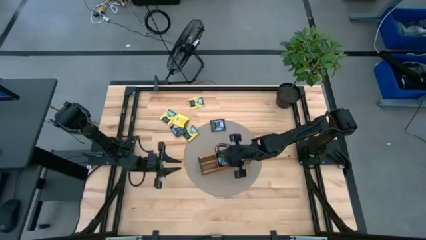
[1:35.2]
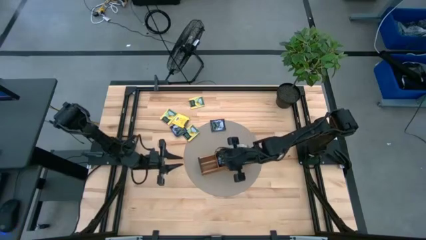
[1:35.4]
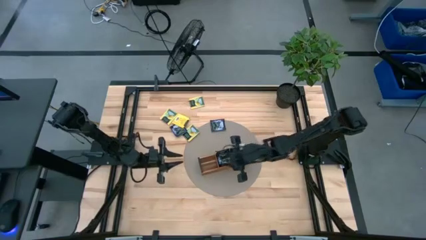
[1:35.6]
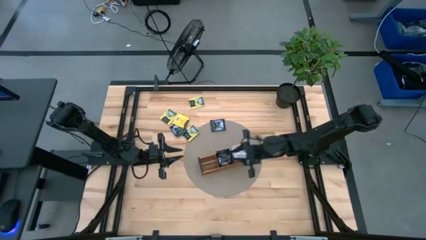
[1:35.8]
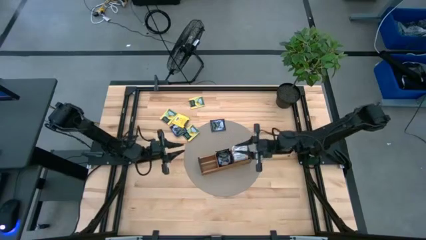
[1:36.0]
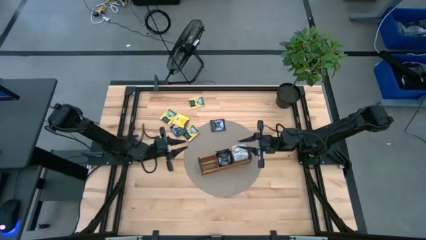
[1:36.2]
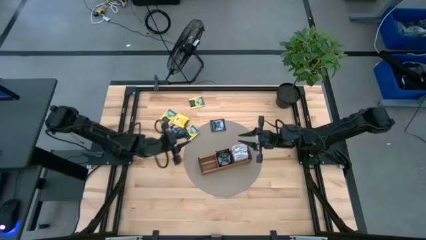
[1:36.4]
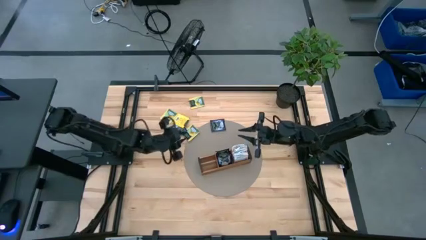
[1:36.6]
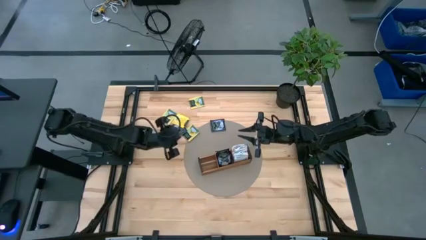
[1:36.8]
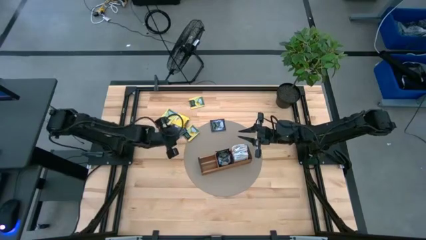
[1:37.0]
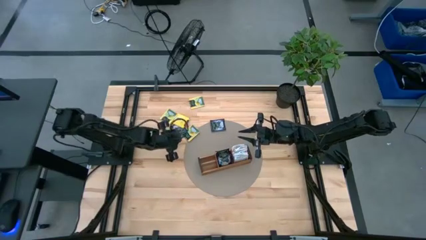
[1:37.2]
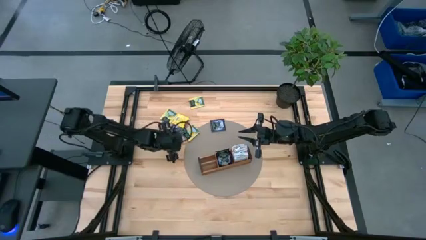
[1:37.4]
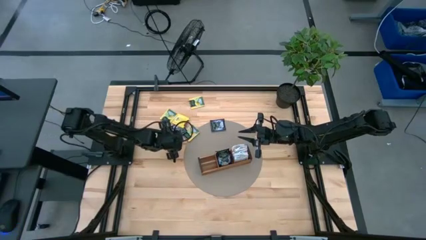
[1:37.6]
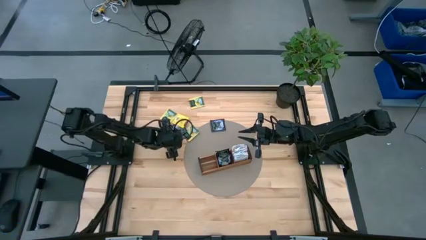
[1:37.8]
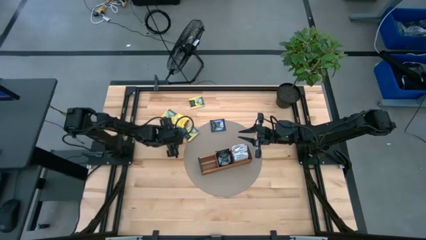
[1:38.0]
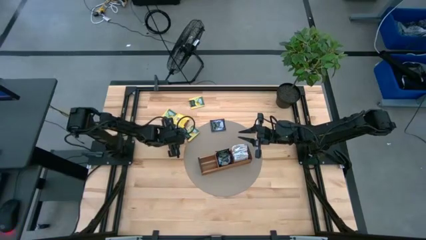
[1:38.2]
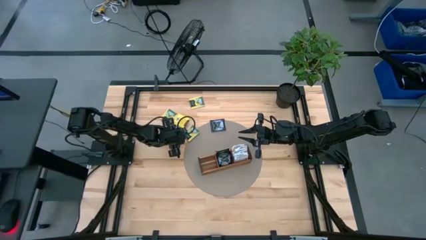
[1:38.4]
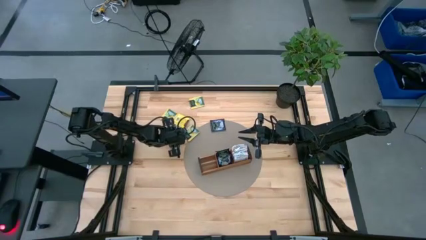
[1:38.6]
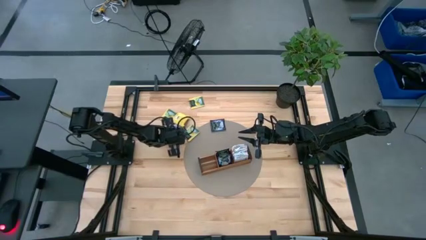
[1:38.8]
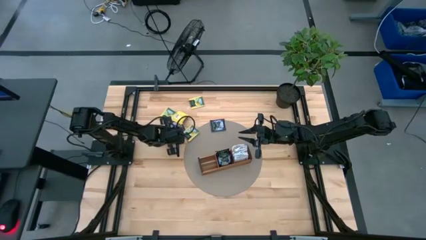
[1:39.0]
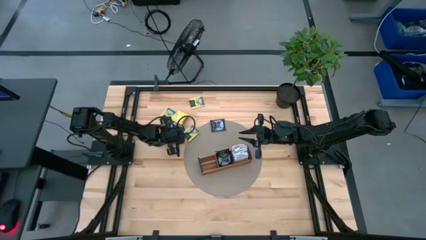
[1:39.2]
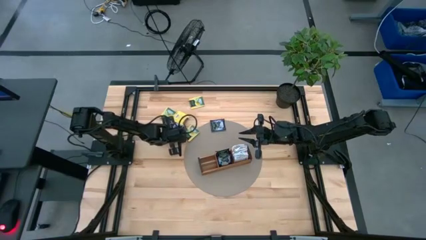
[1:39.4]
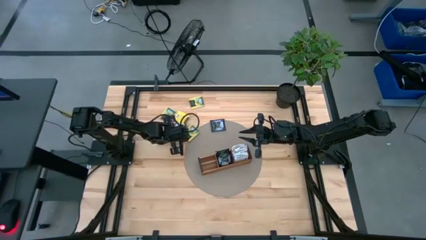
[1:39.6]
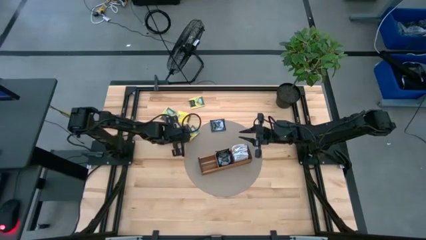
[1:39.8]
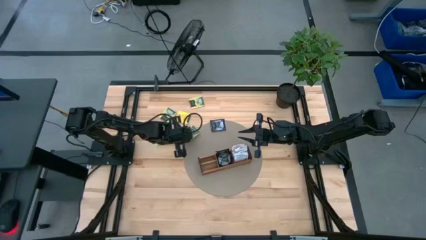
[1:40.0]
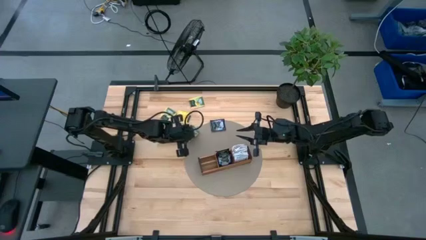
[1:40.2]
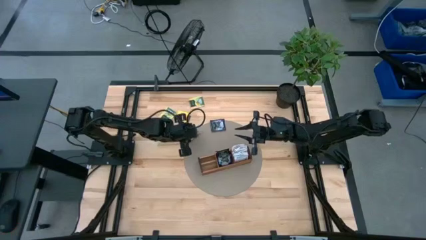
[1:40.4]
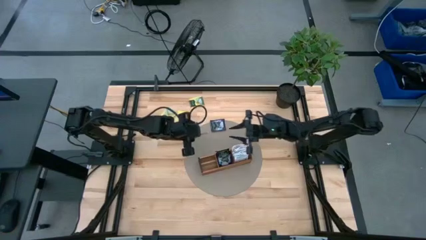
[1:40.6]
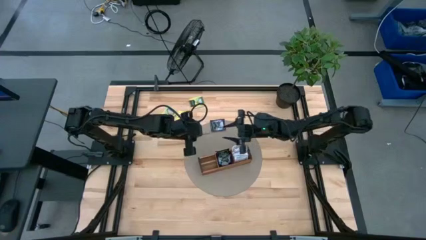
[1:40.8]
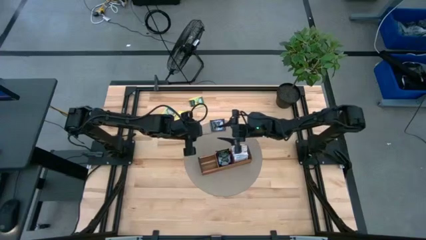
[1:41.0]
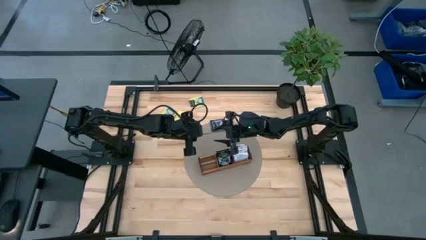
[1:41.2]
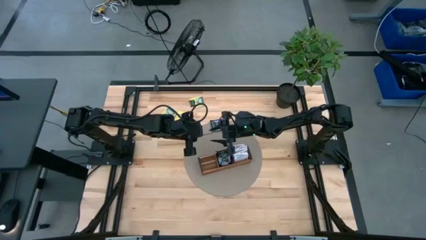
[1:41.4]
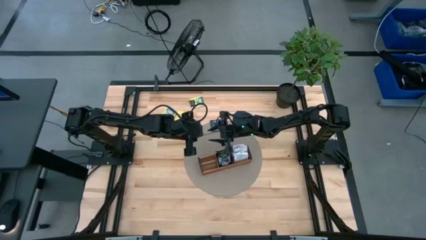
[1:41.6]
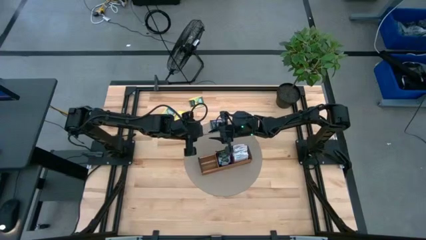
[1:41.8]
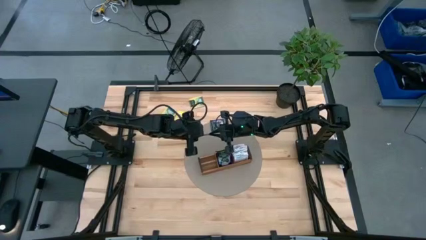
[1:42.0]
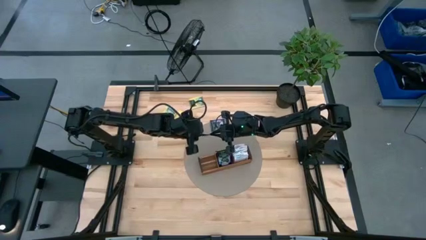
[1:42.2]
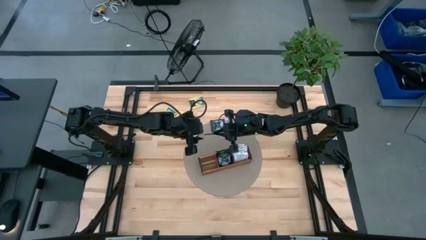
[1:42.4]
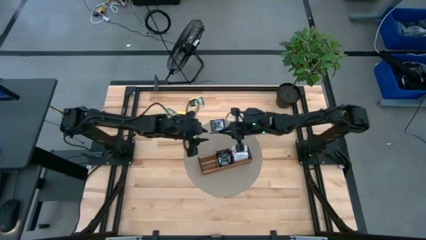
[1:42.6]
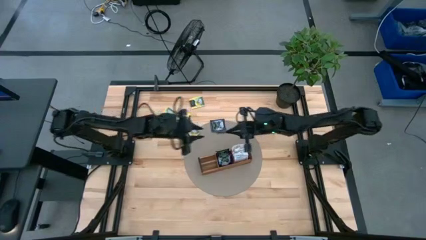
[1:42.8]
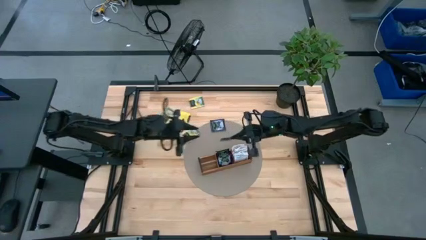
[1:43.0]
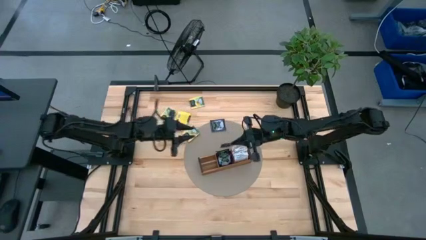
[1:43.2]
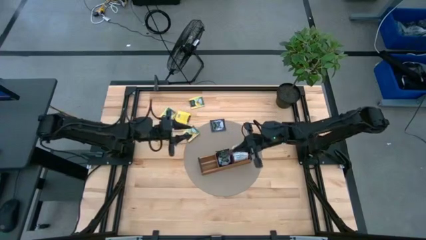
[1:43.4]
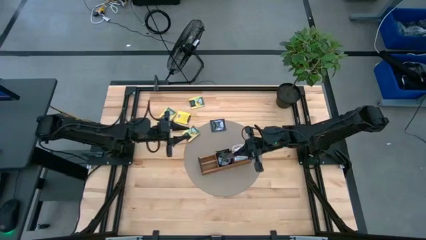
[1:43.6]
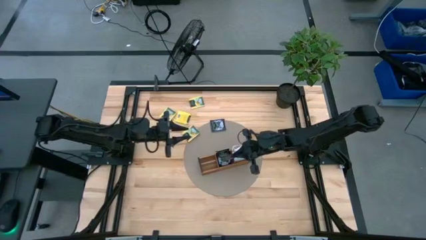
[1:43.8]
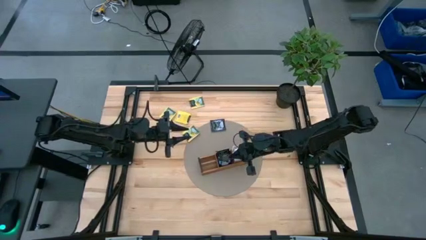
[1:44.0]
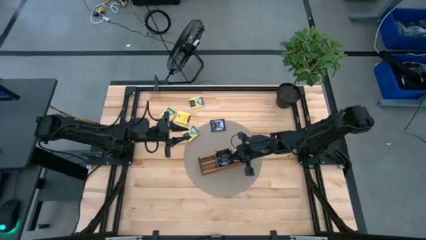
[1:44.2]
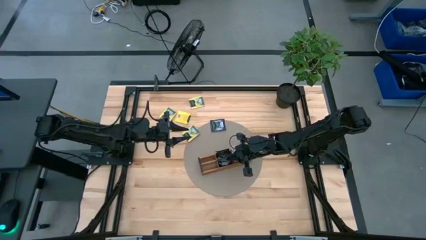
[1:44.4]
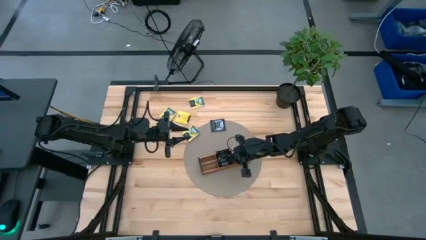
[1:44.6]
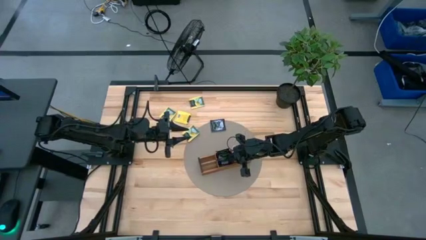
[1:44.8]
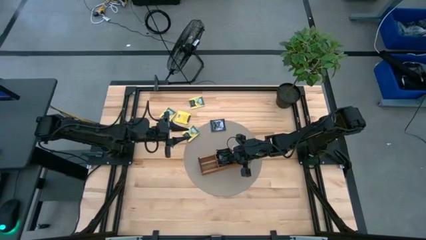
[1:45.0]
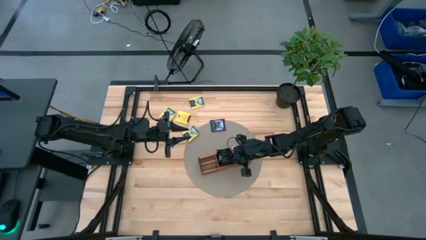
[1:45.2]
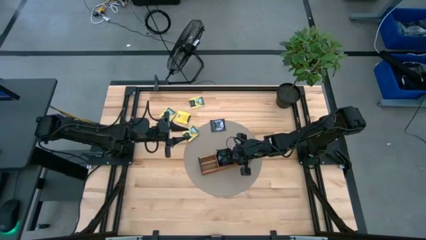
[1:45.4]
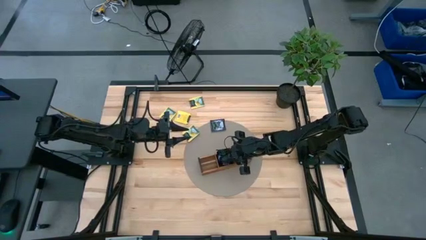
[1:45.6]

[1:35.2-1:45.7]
Task: Pick & Place Tea
Put the purple tea bag into the middle section of the wooden organizer

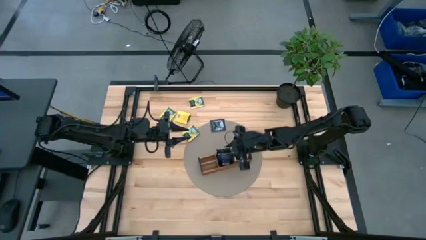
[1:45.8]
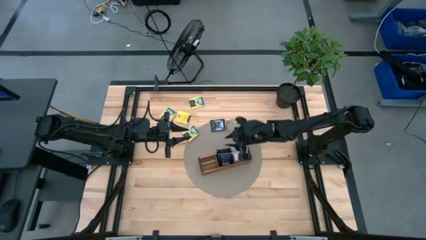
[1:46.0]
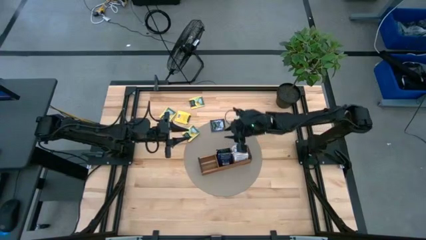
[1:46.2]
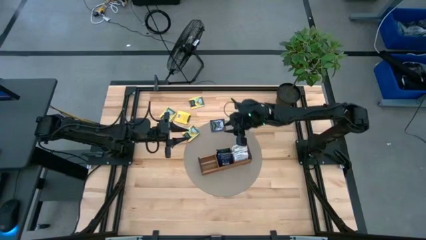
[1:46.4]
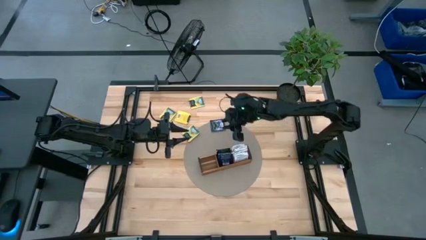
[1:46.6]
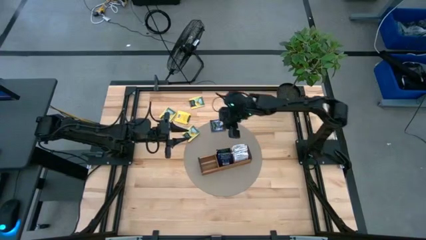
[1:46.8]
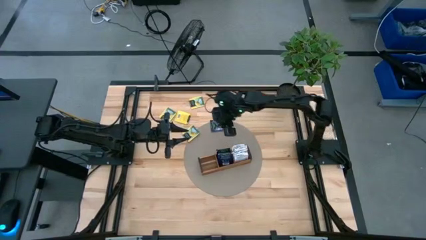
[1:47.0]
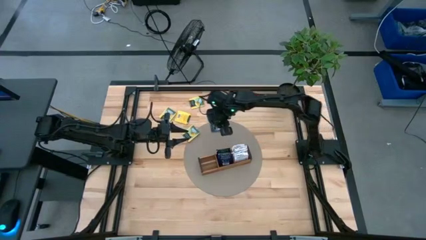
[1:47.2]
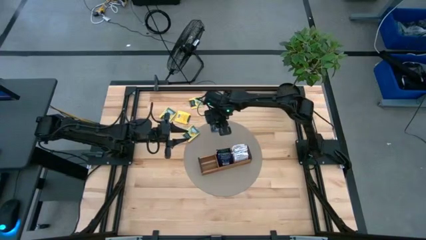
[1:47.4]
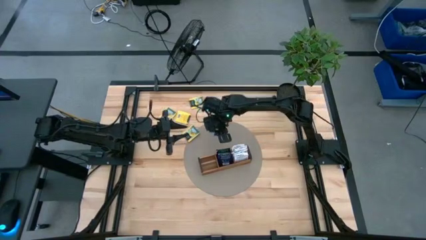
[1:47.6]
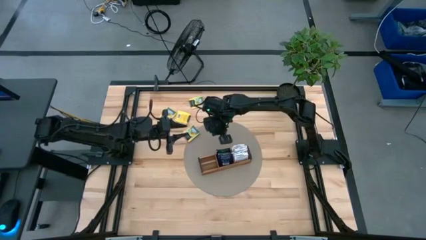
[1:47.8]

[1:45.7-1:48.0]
Put the purple tea bag into the middle section of the wooden organizer

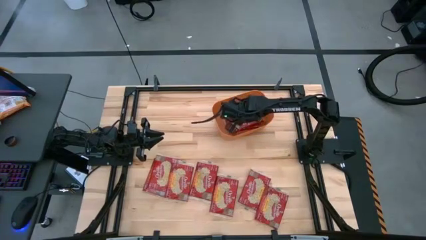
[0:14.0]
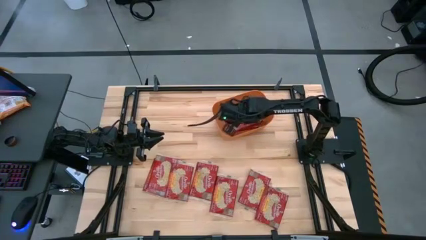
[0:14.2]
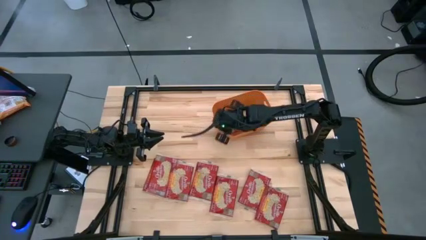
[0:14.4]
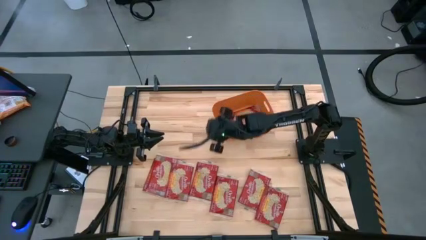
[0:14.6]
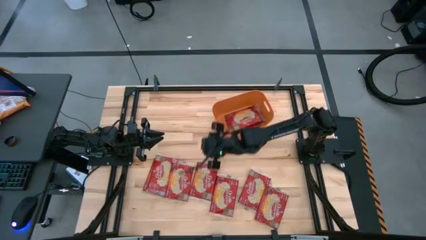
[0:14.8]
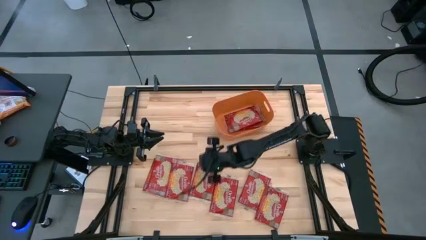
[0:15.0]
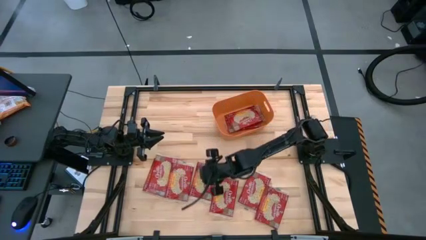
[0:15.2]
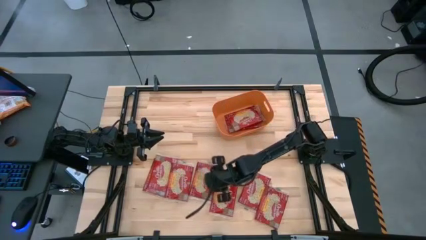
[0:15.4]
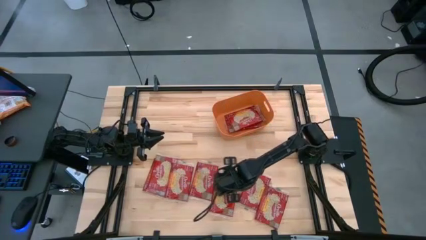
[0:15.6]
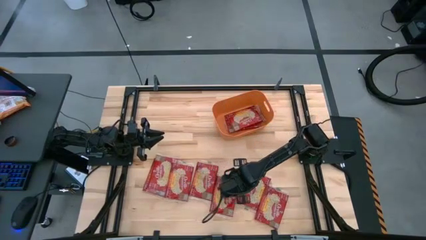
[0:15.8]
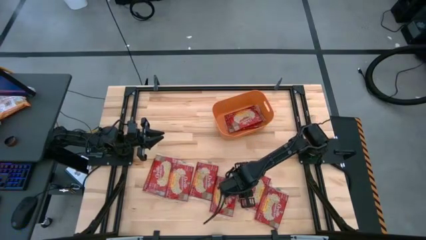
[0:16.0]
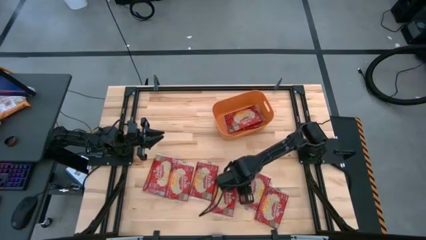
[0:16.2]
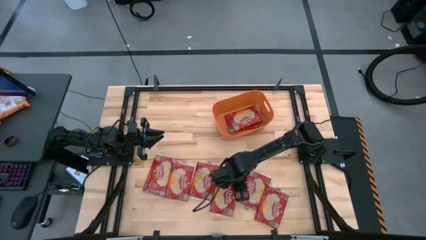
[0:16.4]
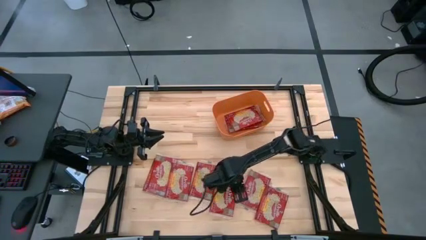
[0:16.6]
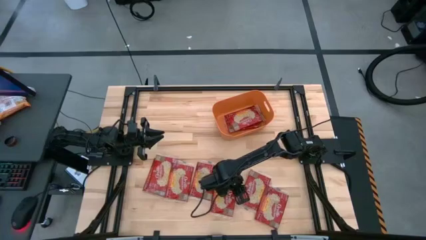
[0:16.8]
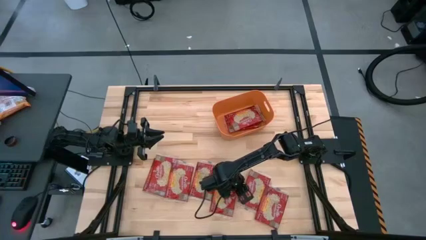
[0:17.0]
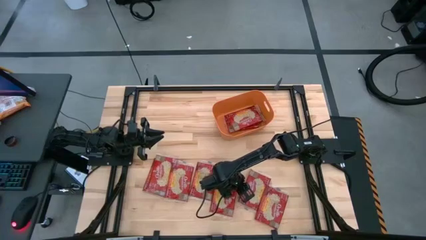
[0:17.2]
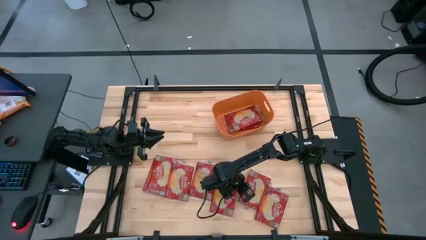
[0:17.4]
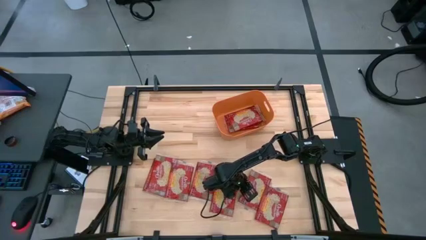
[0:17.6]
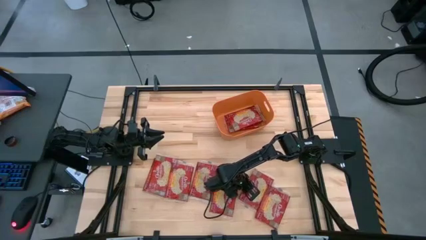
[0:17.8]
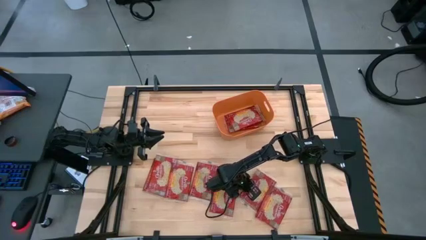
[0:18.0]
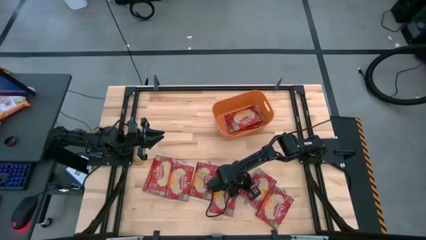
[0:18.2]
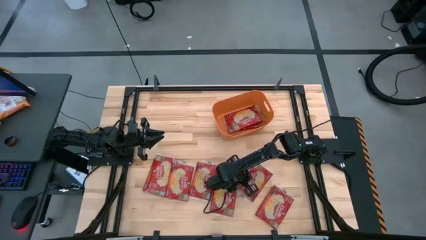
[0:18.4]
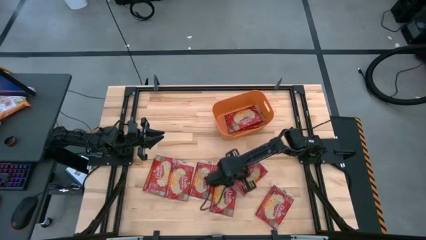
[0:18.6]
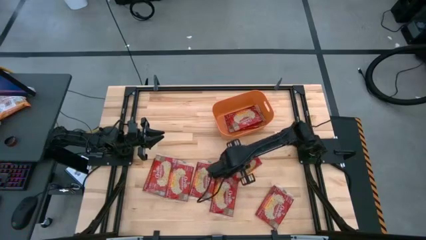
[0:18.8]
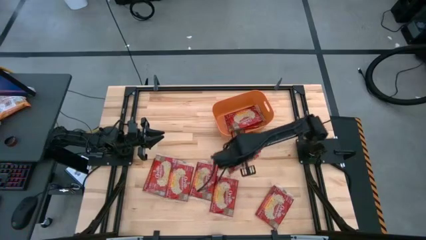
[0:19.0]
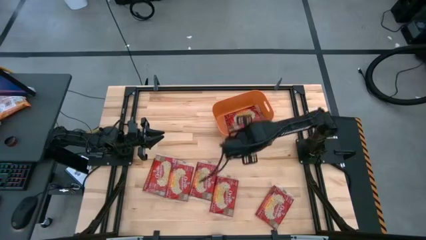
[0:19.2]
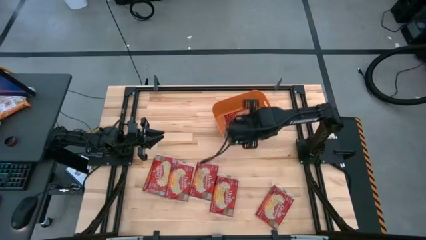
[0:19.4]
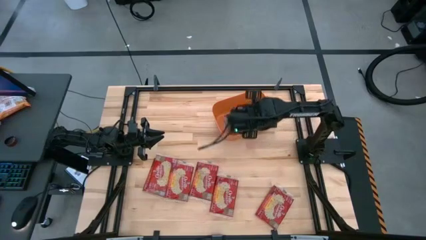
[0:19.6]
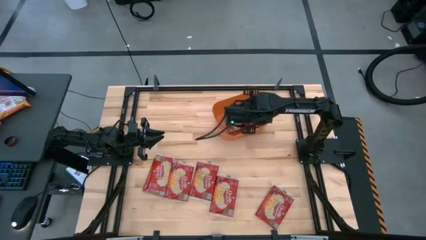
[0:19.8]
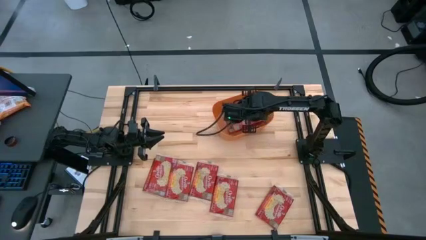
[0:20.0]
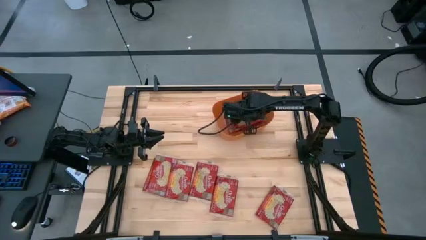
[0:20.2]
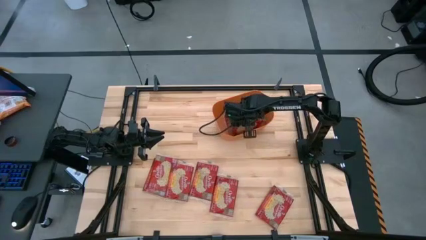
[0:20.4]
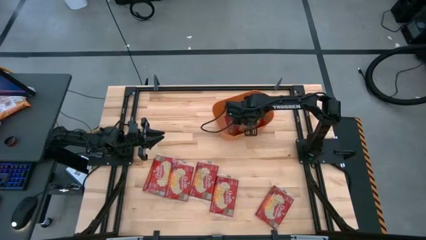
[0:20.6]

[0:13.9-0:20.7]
Task: Sort popcorn bags into baskets
Put the popcorn pack into the orange bin
